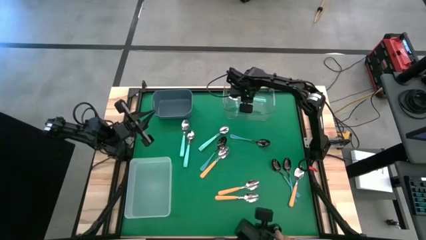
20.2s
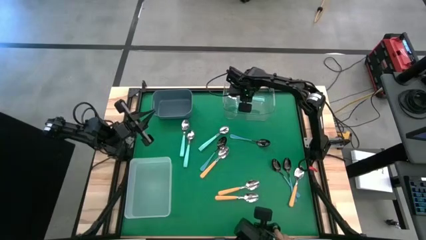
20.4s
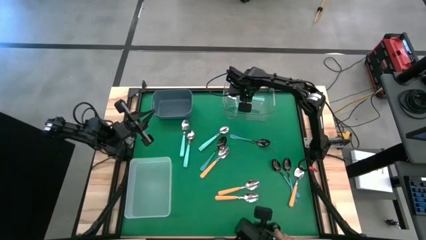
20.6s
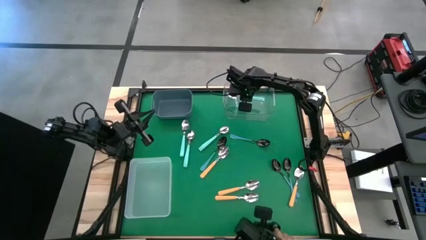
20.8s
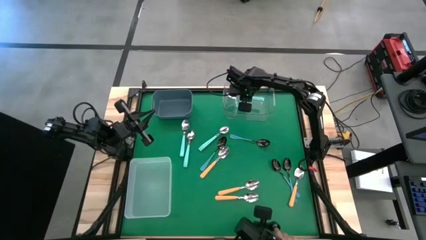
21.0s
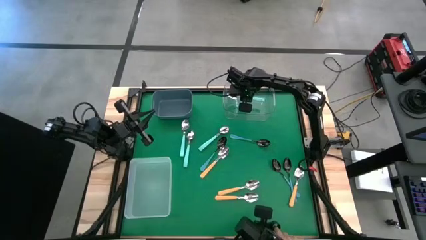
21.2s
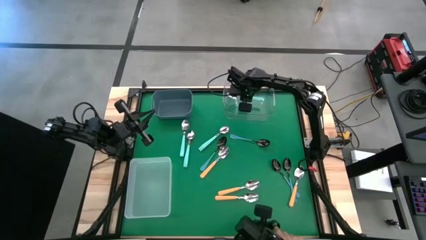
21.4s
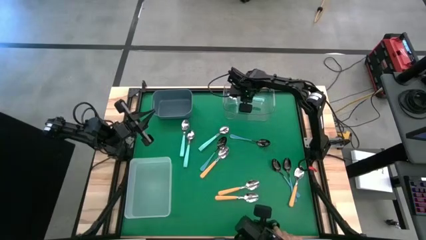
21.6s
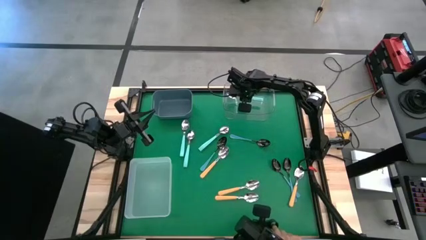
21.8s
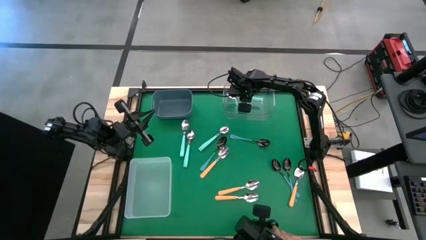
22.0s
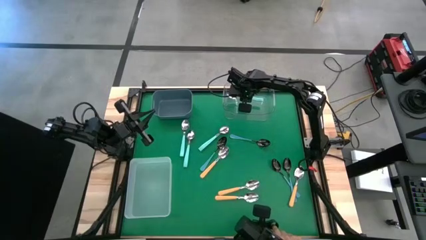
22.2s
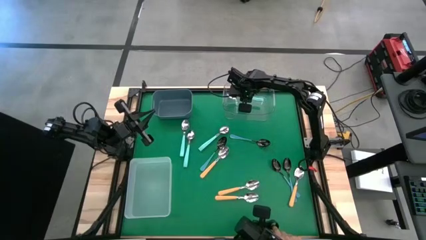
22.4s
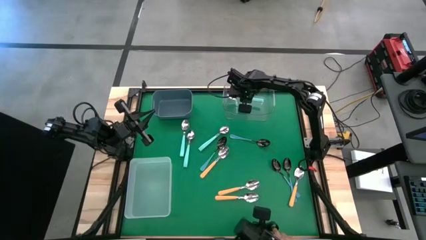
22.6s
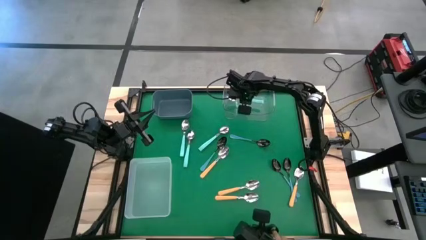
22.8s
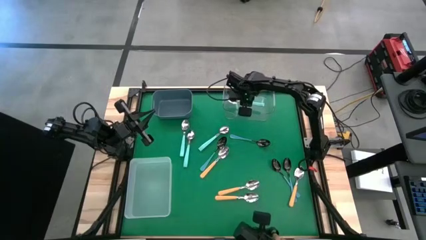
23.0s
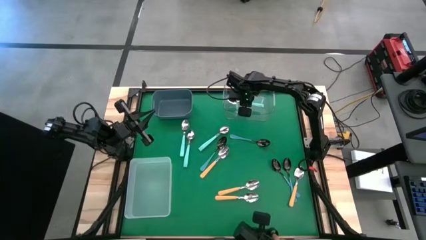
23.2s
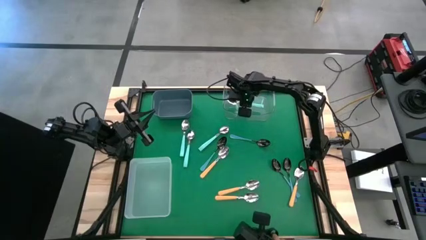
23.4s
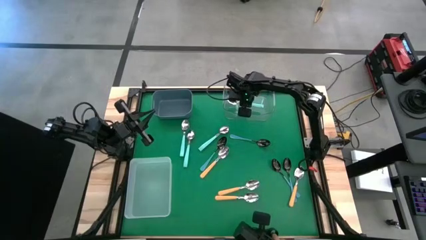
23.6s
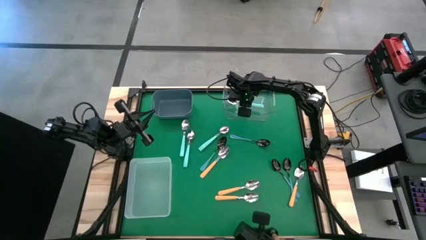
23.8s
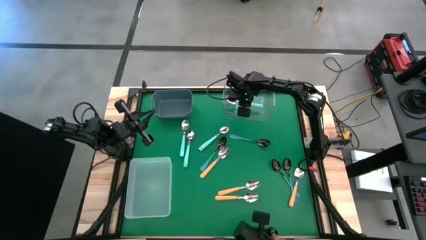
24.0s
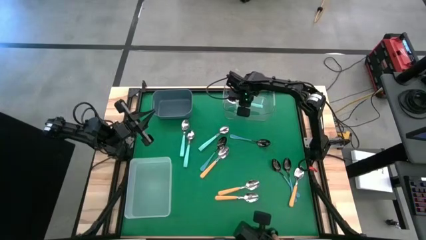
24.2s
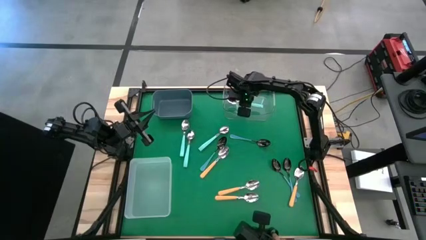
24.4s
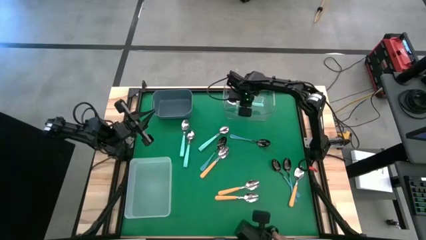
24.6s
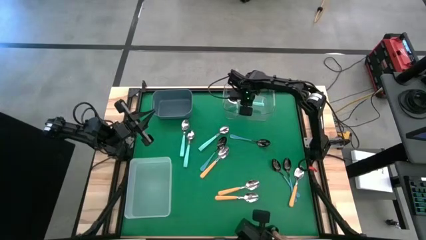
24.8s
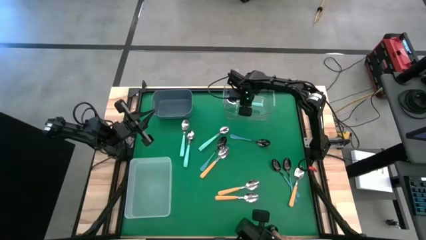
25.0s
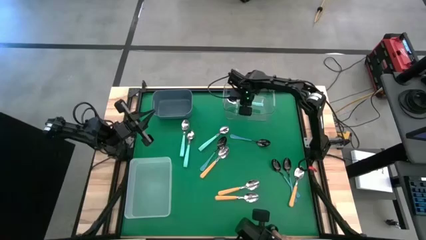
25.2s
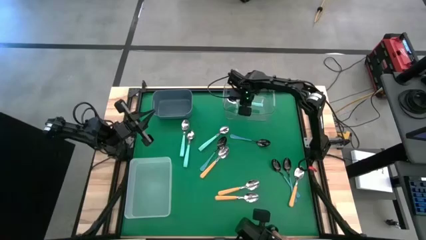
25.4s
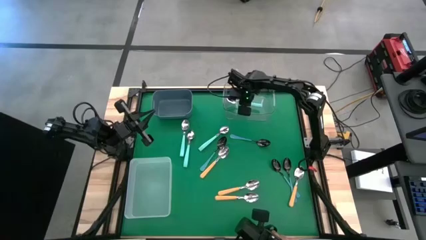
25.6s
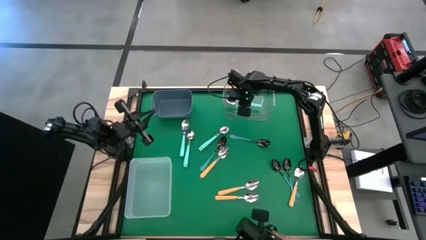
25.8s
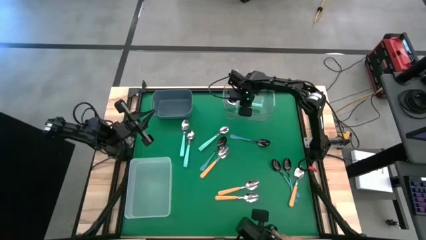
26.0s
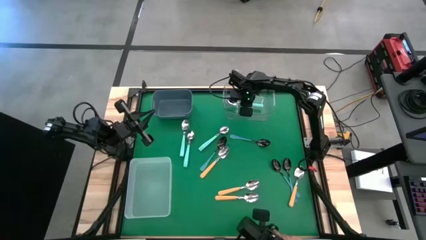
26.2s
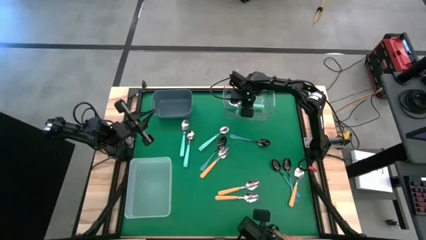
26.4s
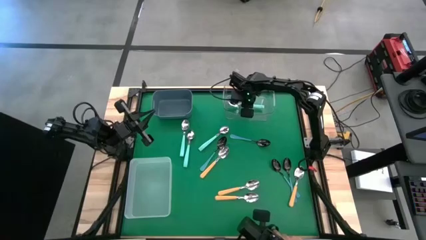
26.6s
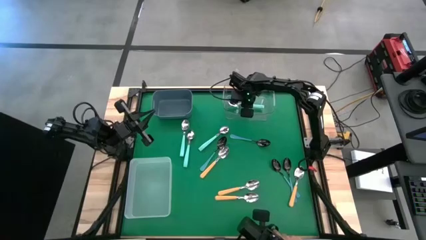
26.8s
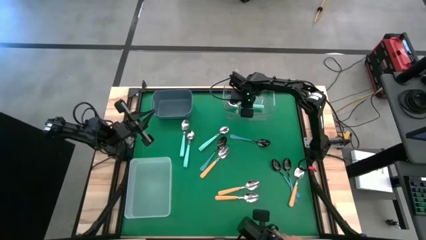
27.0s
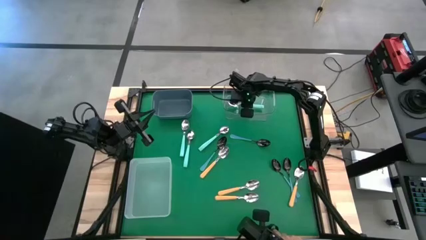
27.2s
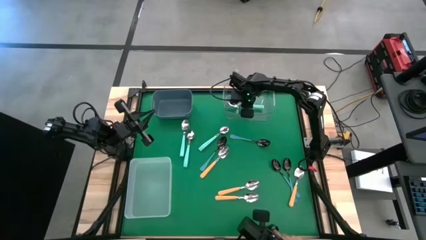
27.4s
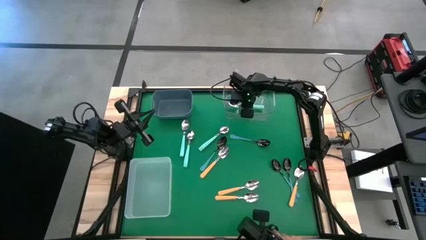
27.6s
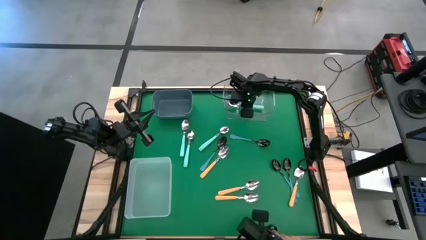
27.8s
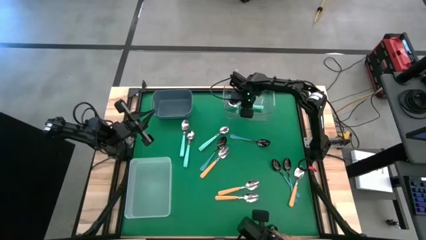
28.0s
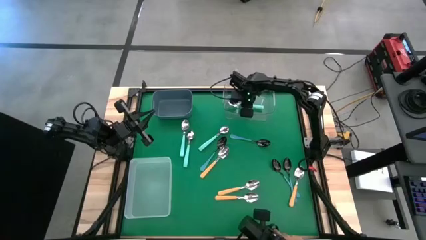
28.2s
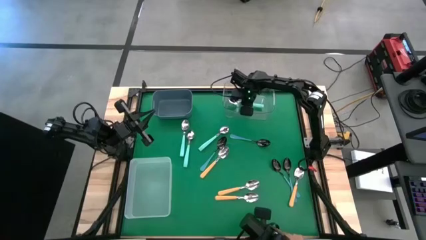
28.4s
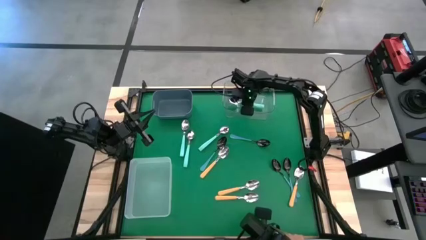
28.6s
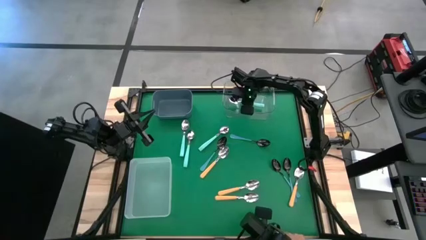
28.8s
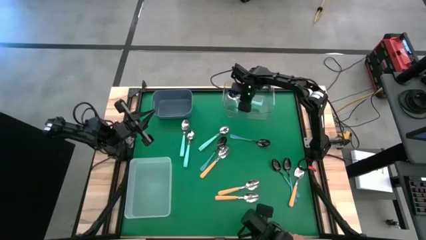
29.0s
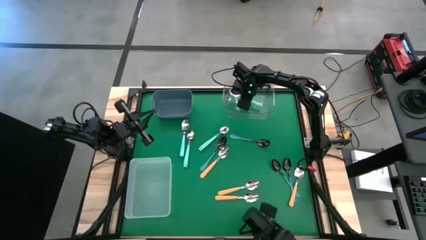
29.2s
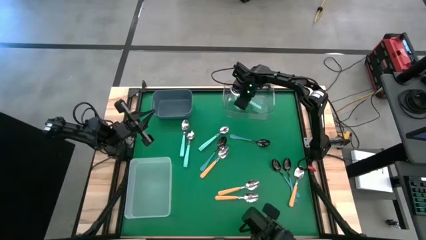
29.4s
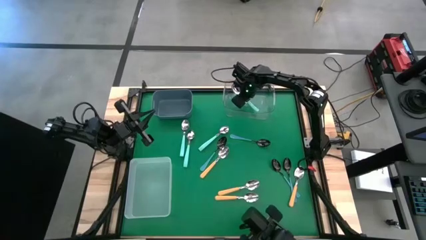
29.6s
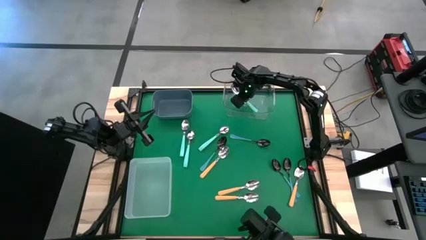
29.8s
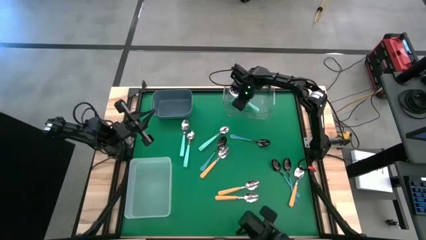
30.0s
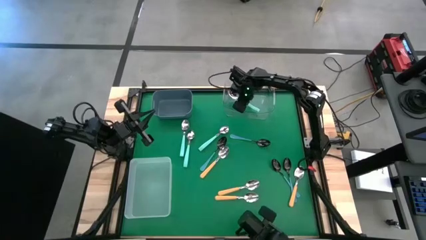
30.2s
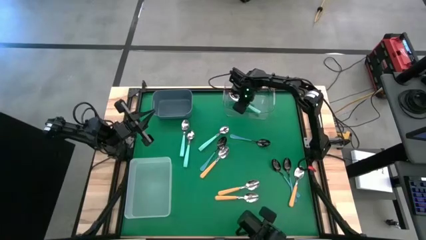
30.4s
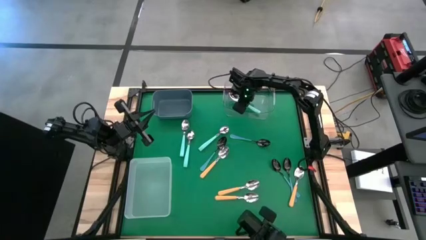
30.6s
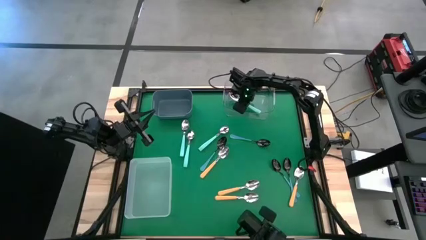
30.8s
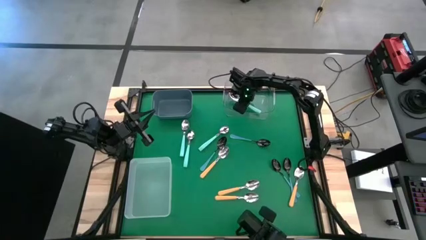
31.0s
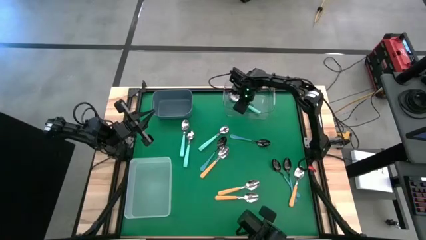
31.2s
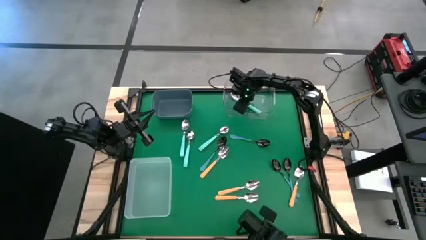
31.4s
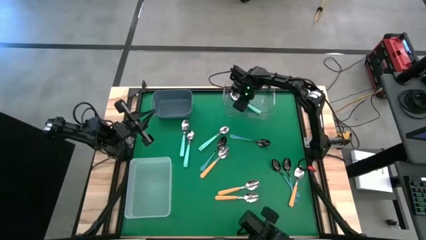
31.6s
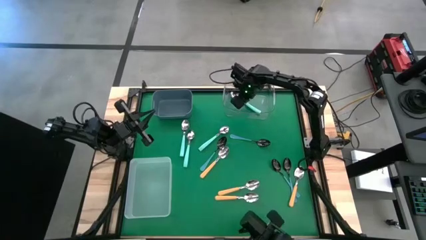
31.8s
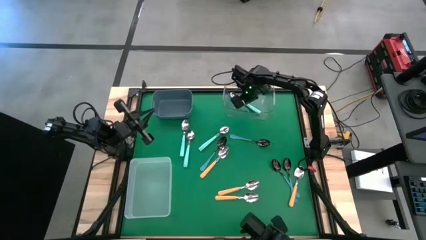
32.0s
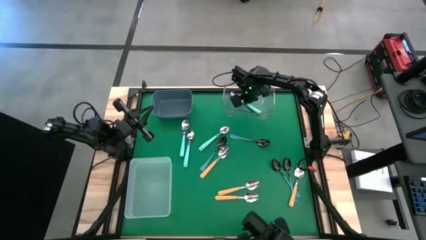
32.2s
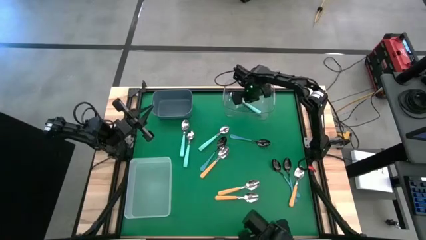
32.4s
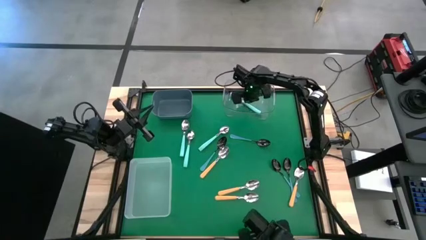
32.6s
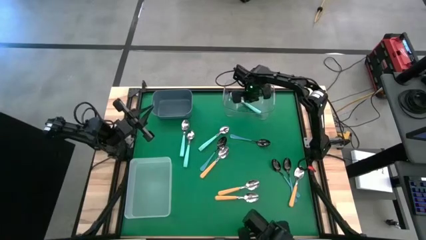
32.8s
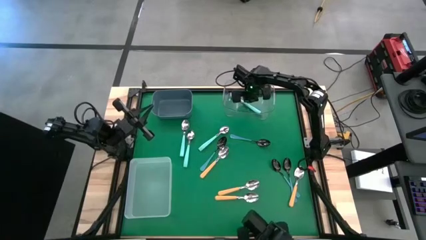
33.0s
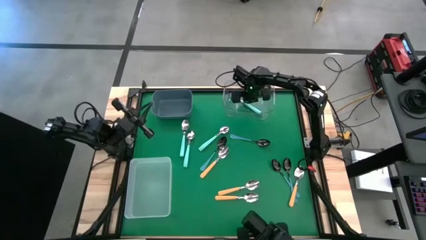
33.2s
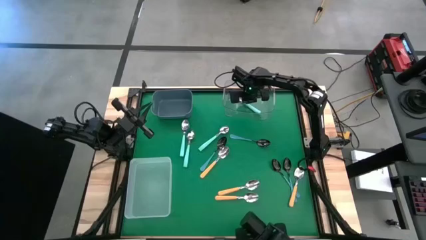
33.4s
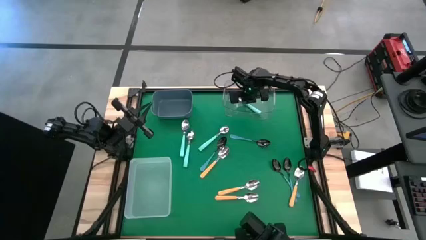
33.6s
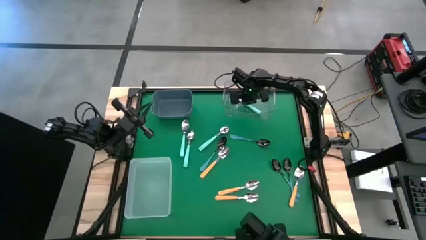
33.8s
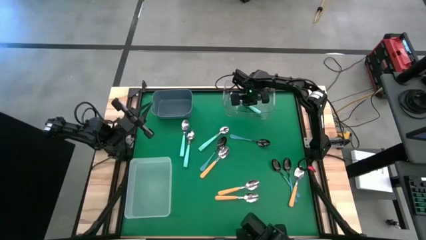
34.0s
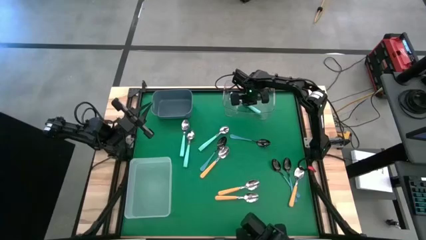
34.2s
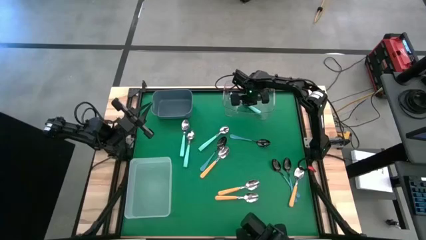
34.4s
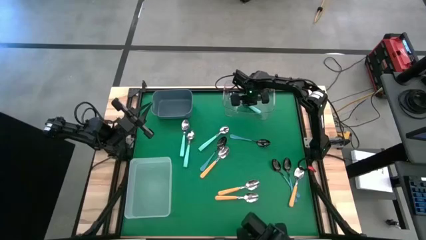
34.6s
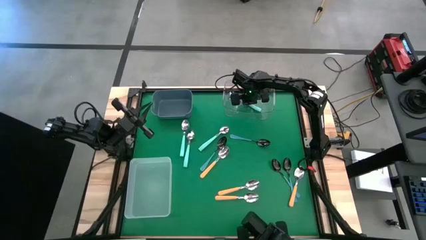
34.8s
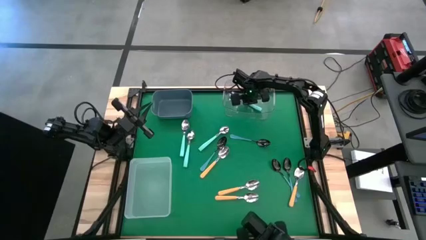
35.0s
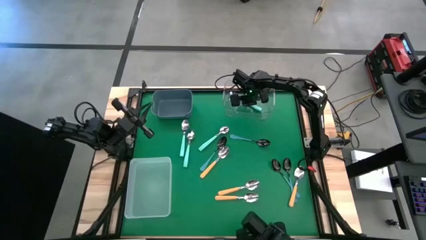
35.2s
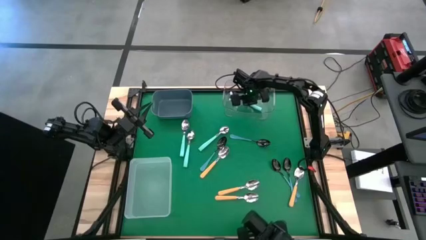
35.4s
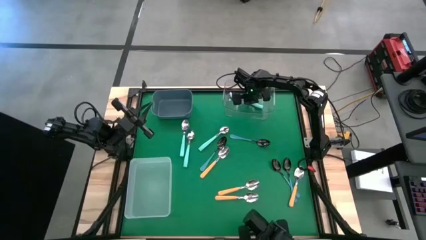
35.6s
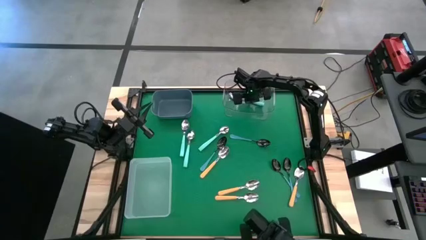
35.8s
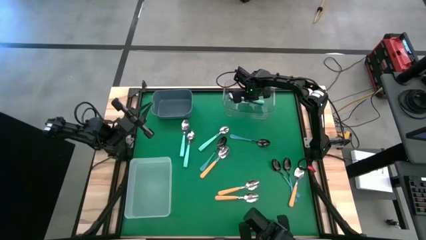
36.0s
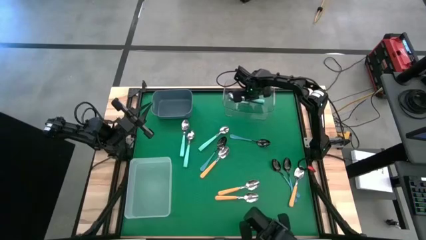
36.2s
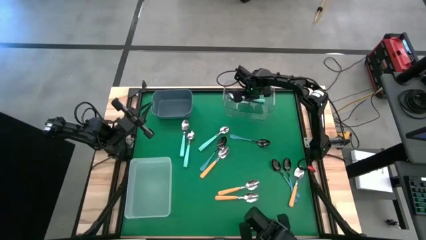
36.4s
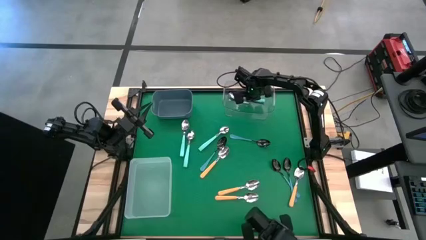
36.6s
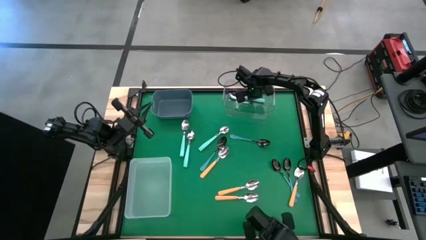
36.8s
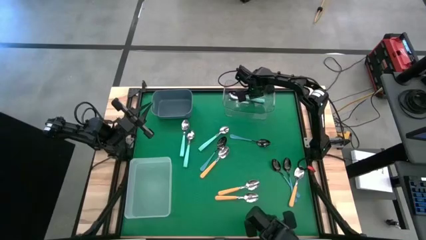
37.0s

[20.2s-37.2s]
Task: Sort silverware by color (type)
Put the light blue spoon into the transparent bin

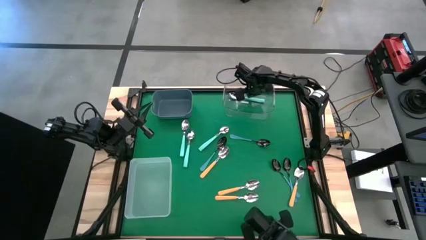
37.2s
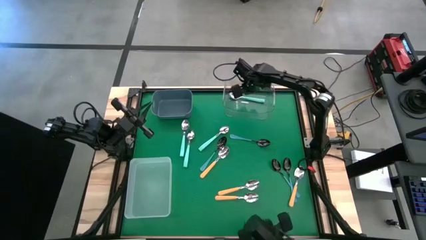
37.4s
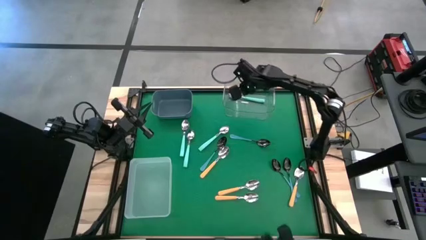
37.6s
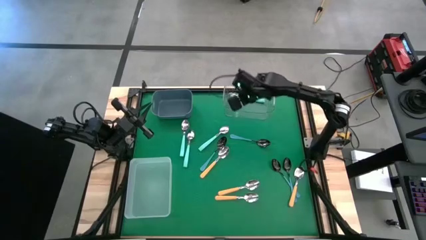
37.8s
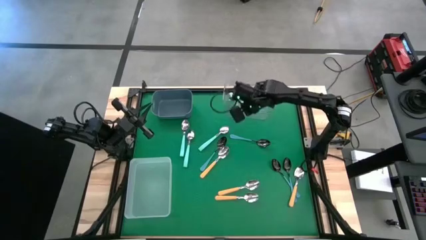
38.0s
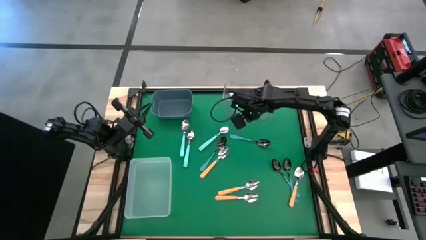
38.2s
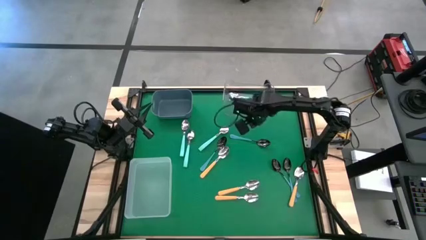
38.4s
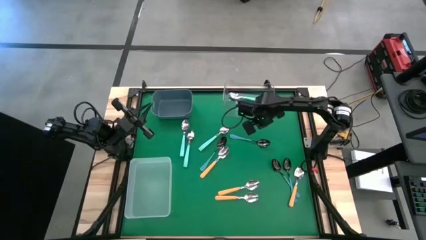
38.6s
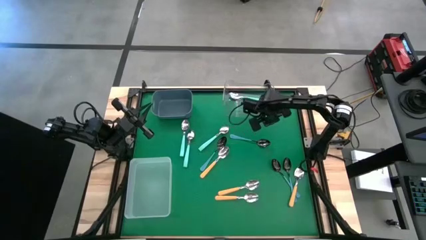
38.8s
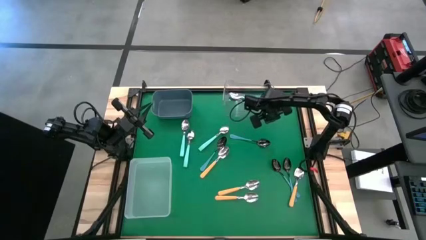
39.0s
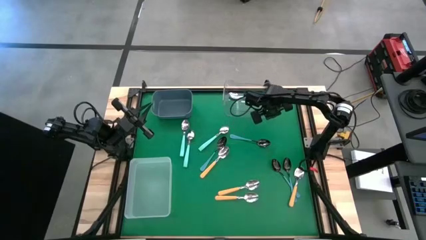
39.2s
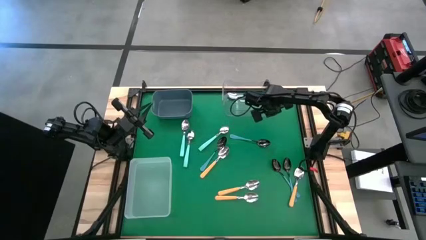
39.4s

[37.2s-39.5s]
Adjust the transparent bin
